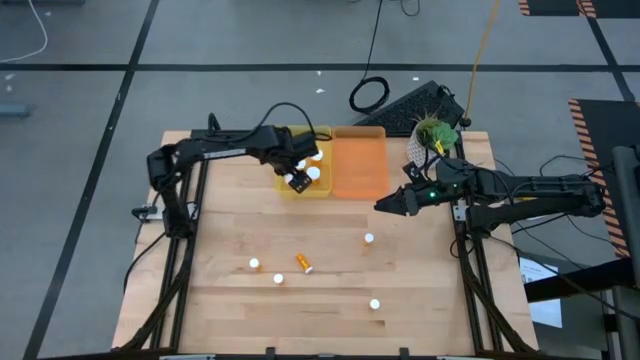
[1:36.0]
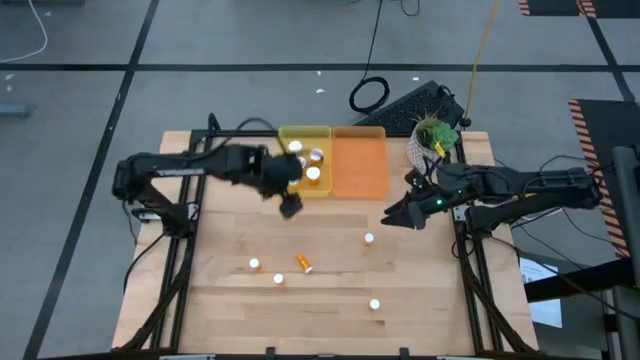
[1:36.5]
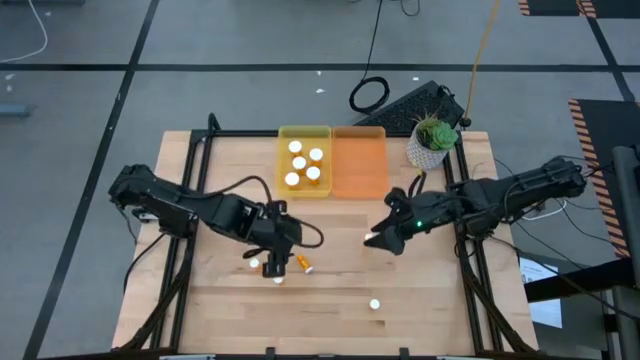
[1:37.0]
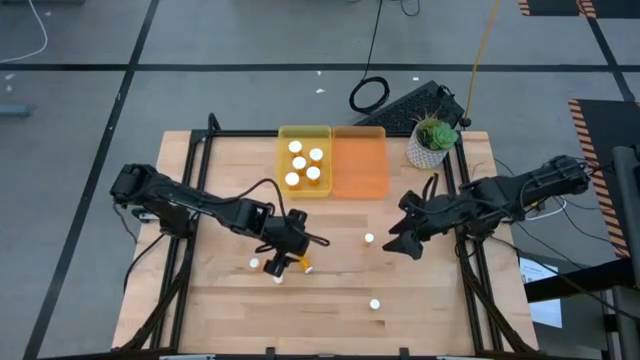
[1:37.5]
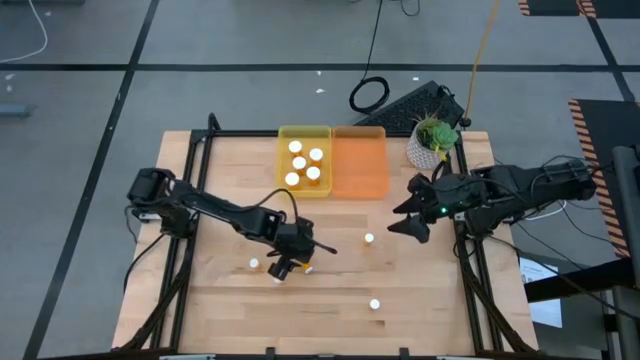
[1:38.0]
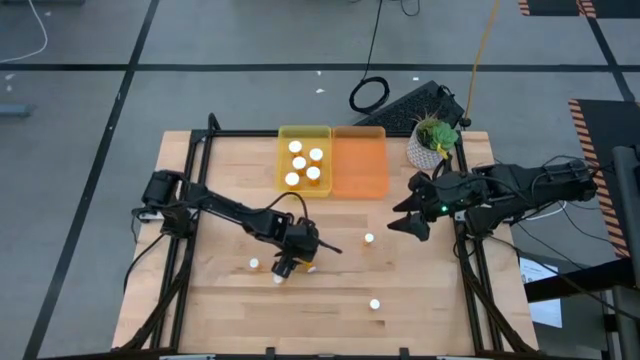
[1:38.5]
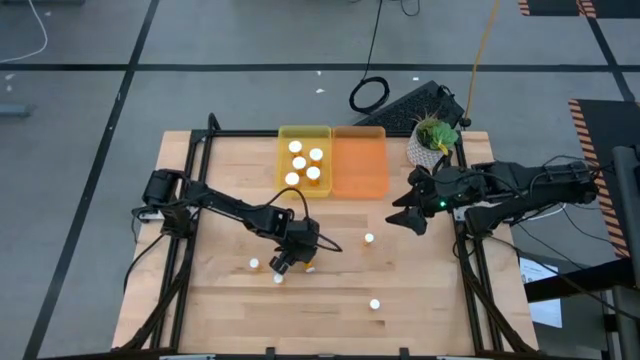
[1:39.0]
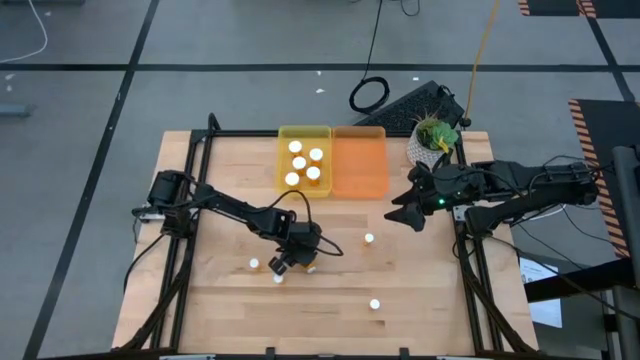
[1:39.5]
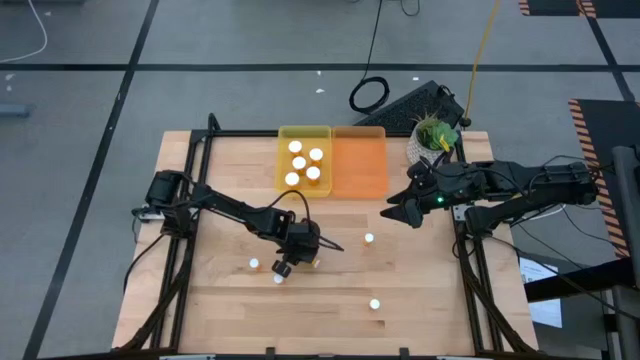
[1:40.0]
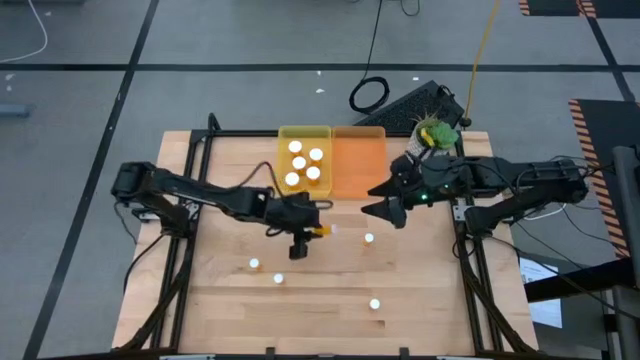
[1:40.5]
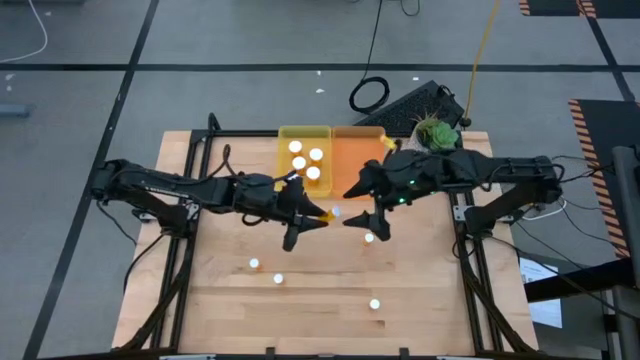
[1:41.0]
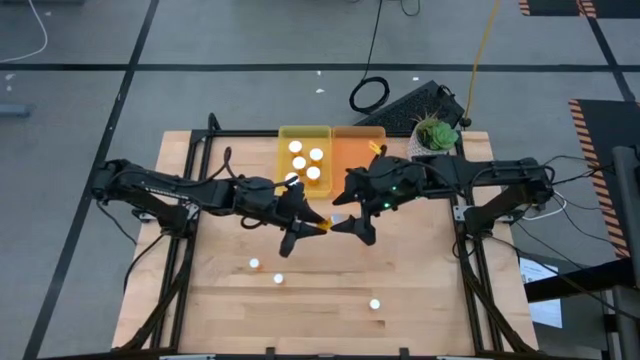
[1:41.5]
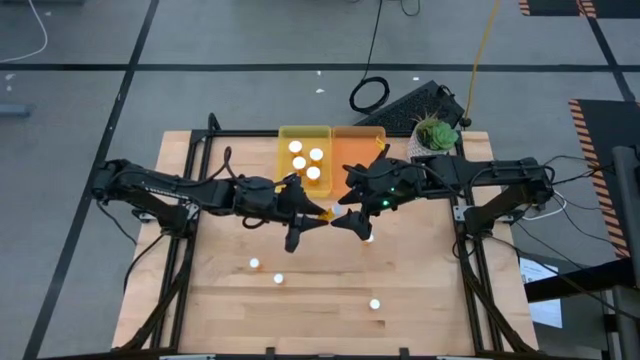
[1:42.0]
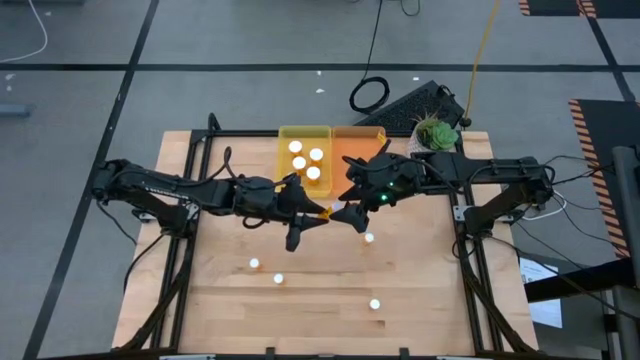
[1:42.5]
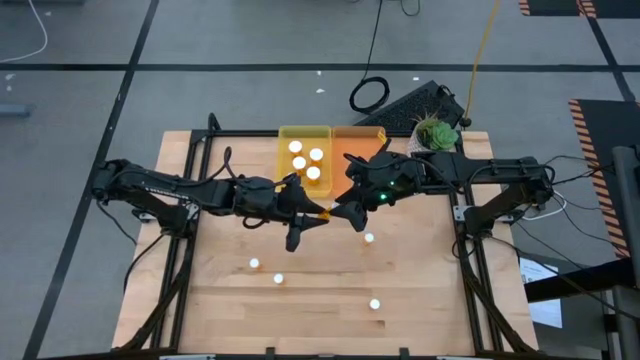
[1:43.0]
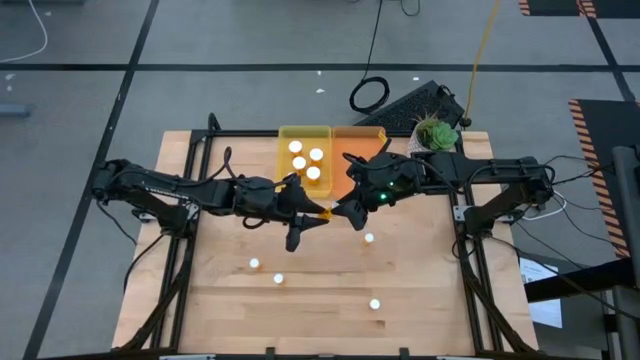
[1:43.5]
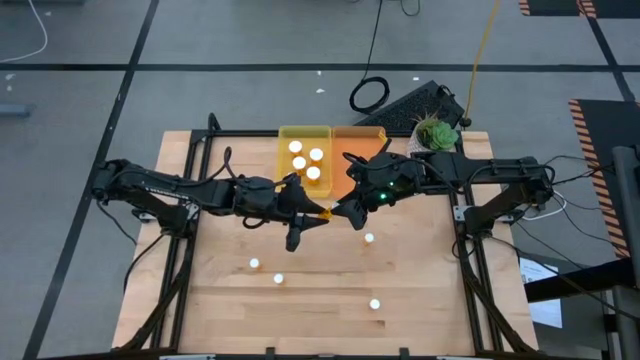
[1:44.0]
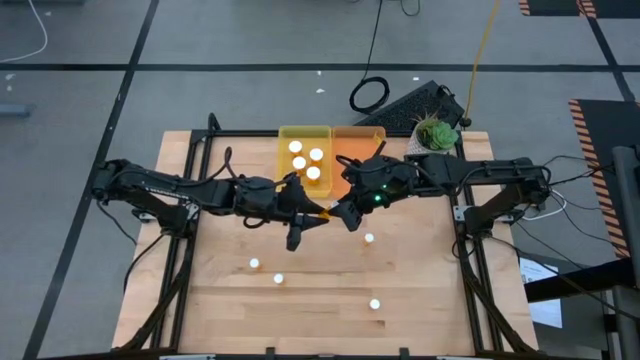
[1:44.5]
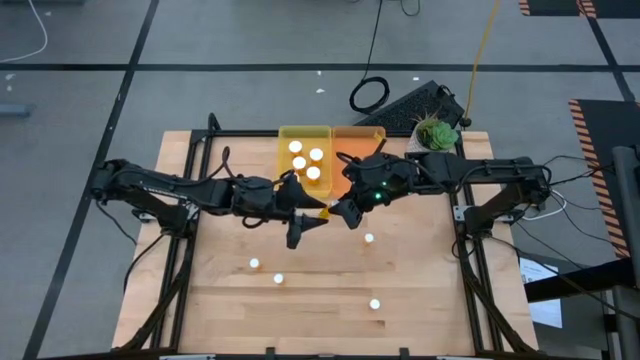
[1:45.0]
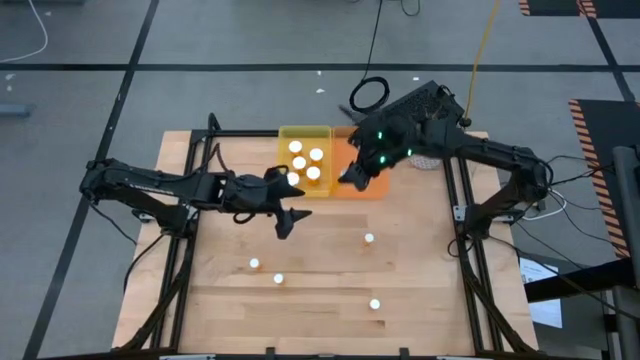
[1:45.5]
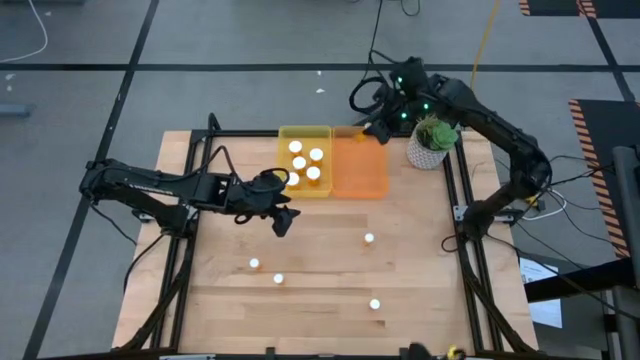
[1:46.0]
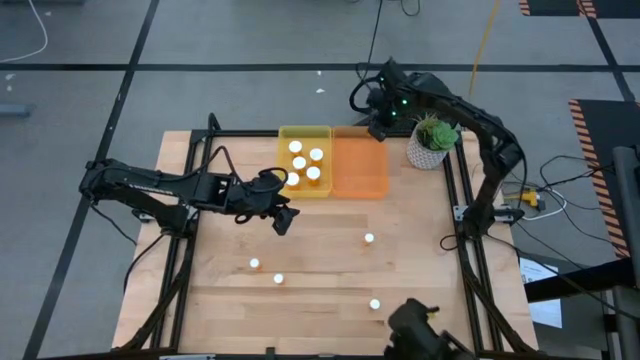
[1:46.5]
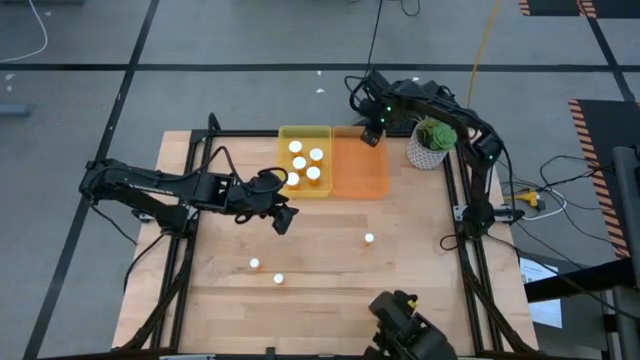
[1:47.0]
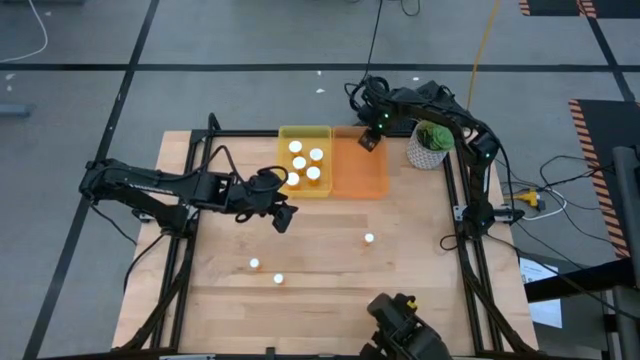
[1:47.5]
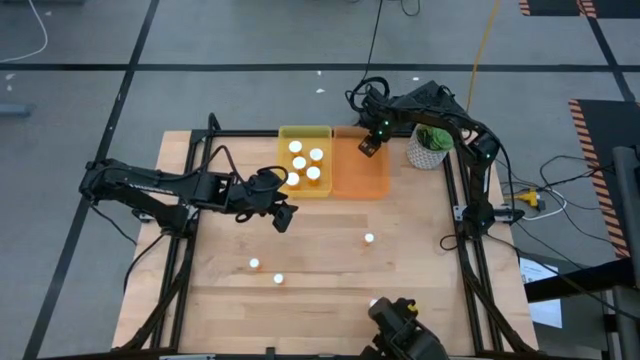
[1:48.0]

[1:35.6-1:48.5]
Task: Pick and place medicine bottles into bin by pill shape (circle, oval)
Put the small orange tablet bottle into the orange bin

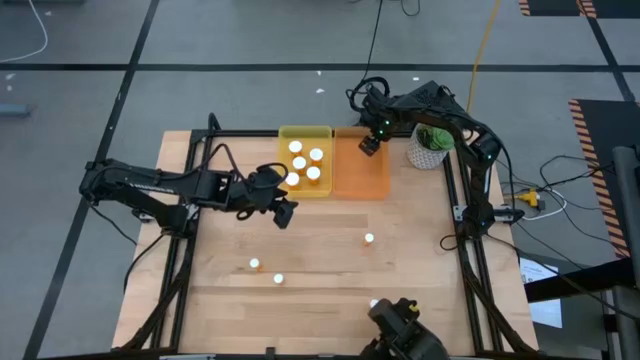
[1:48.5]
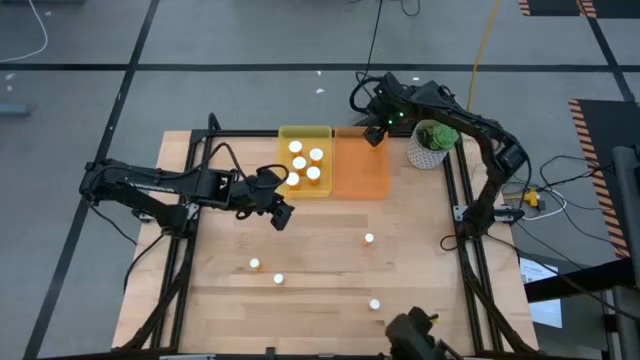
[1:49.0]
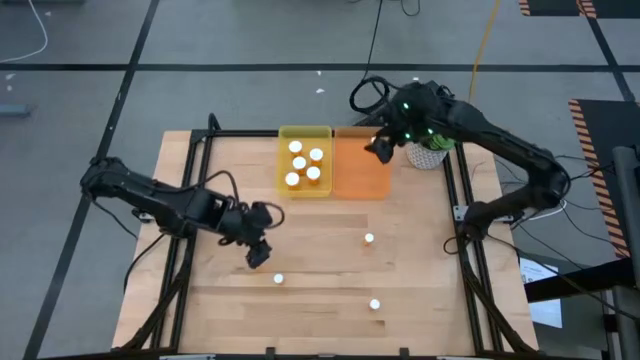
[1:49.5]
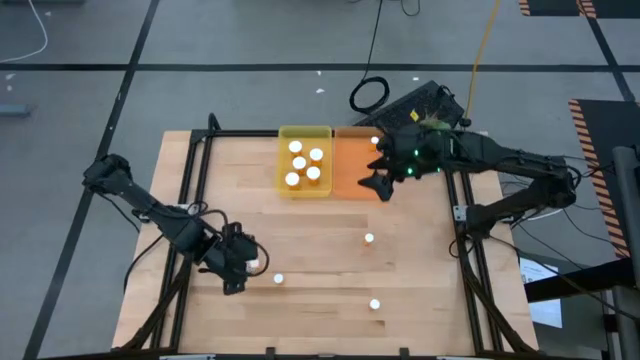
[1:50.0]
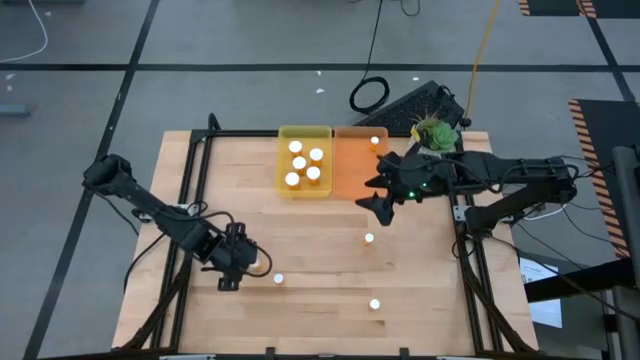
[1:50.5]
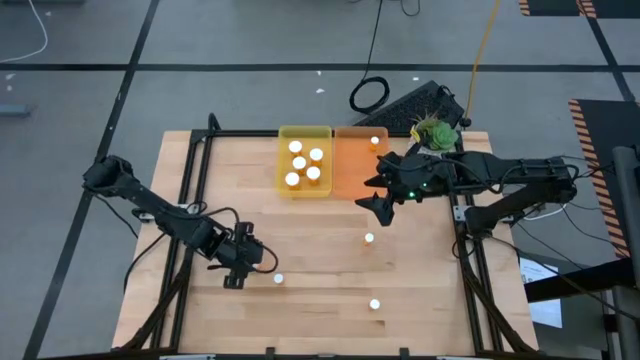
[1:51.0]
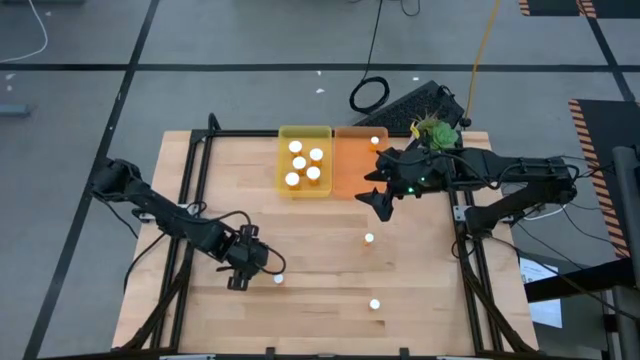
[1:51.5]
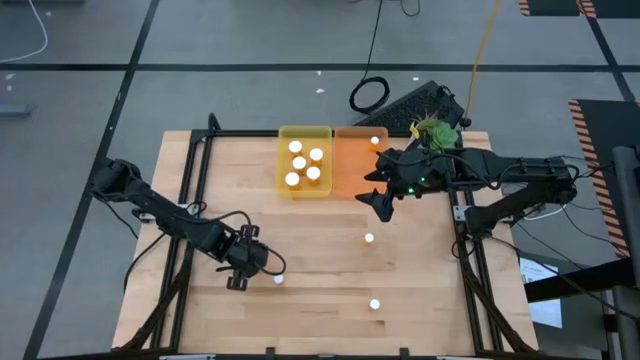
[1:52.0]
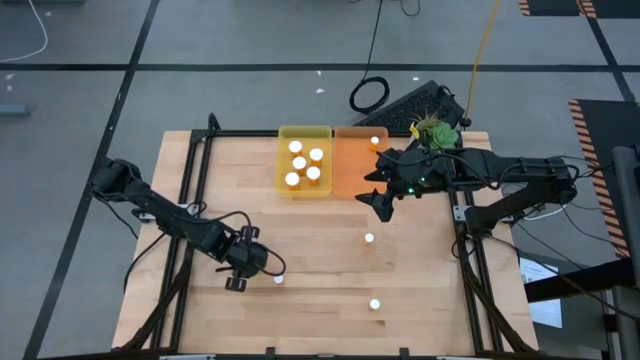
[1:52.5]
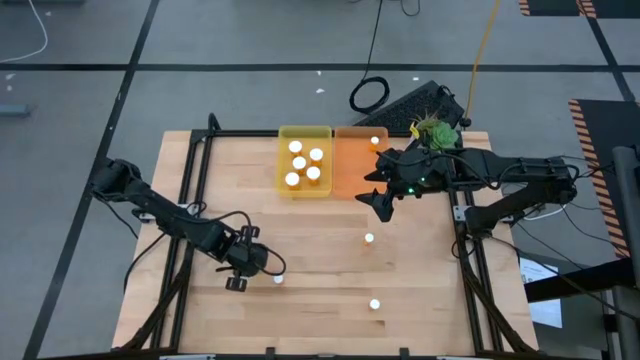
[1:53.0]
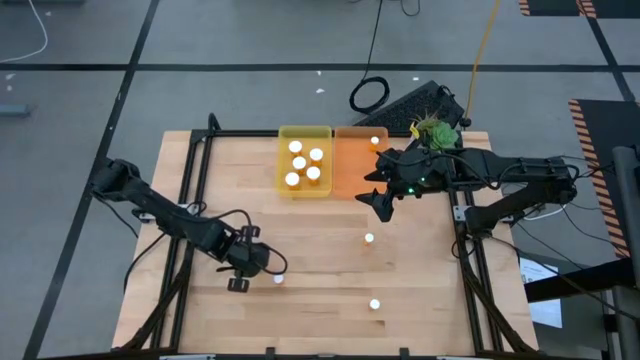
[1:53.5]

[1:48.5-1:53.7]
Put the small orange tablet bottle into the orange bin

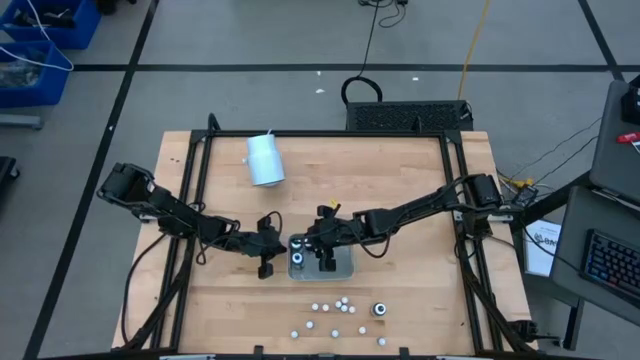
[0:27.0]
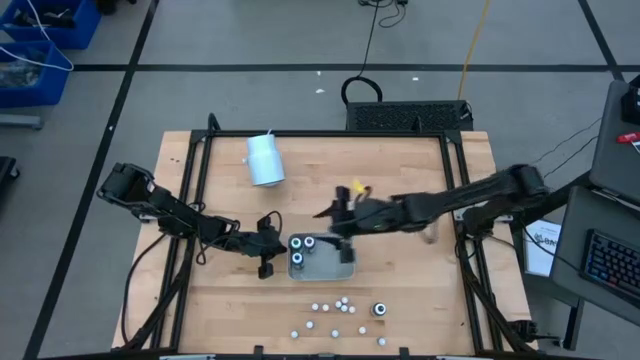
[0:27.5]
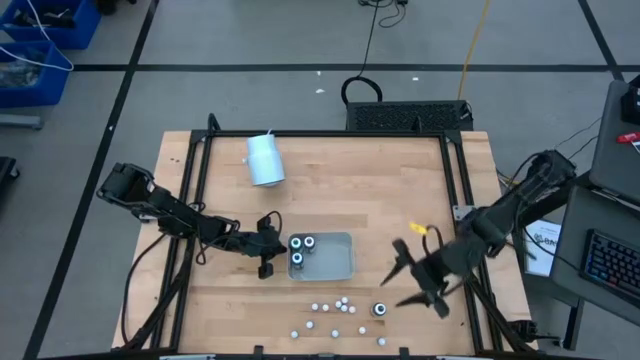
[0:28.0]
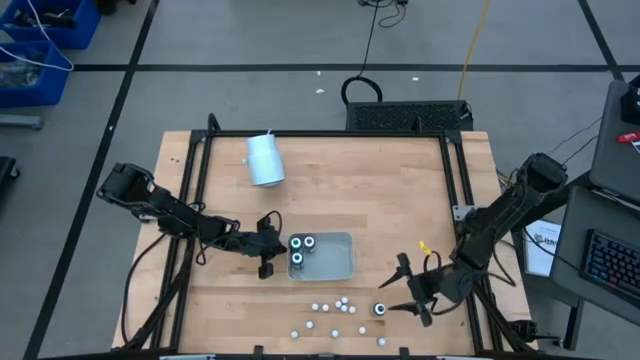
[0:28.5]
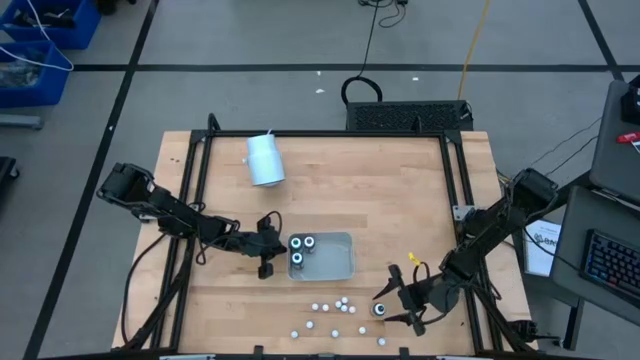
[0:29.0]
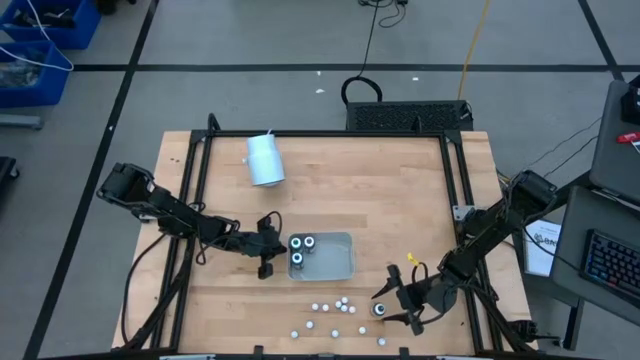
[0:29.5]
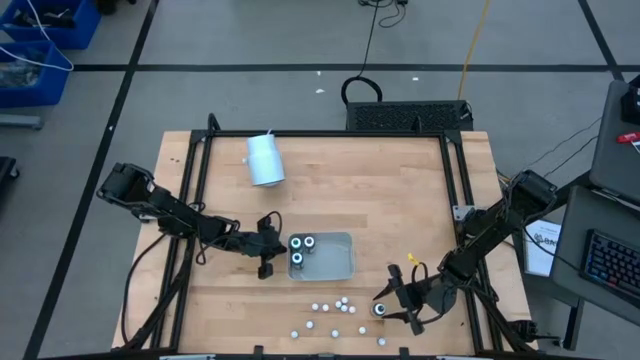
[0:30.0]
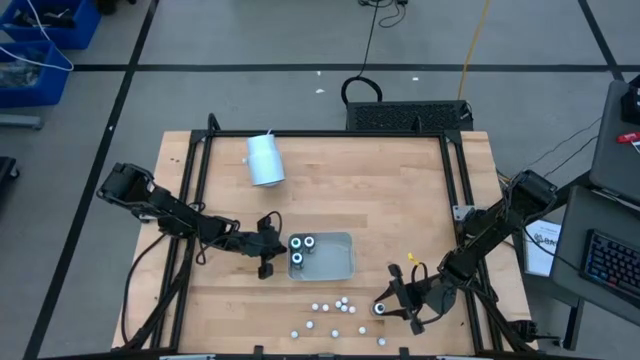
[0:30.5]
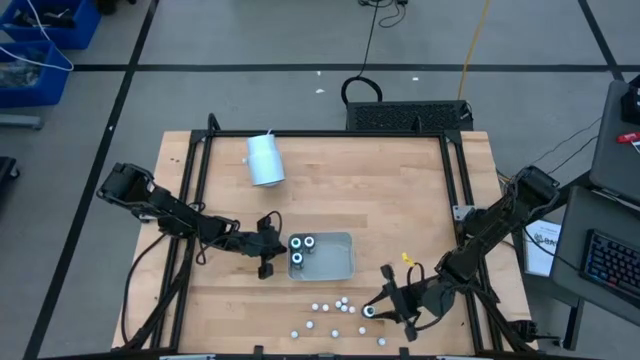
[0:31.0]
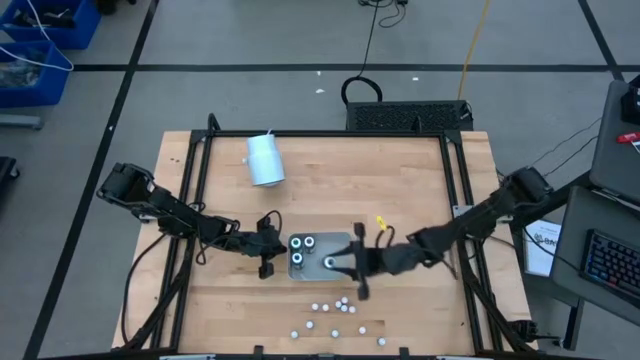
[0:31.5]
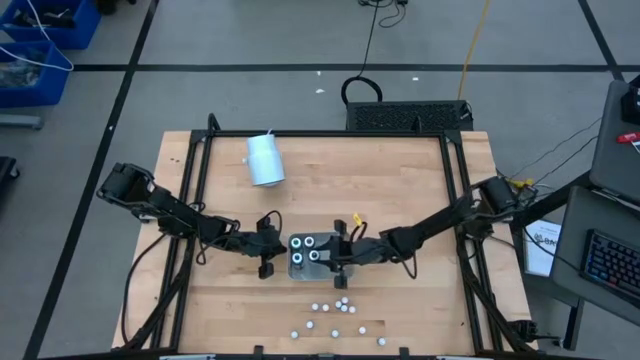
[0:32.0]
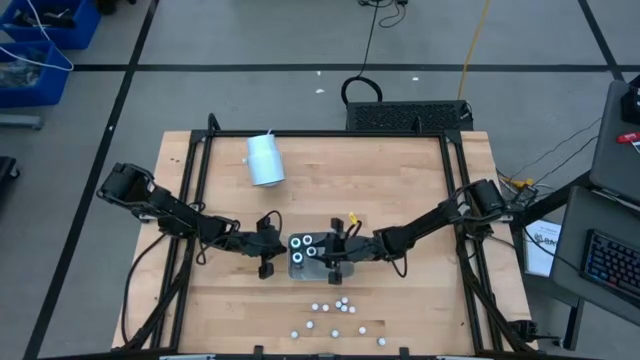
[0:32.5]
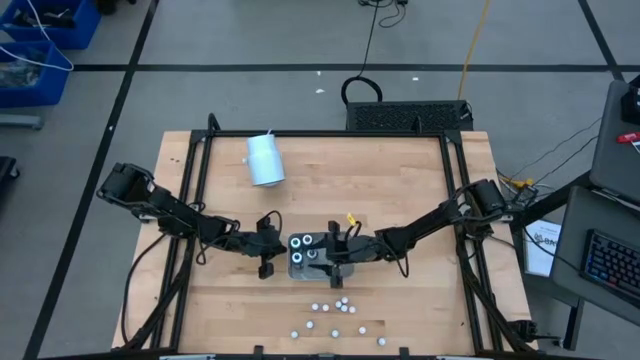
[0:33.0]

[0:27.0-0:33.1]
Task: Pick & Place food coloring
Put the big black food coloring bottle into the gray bin
